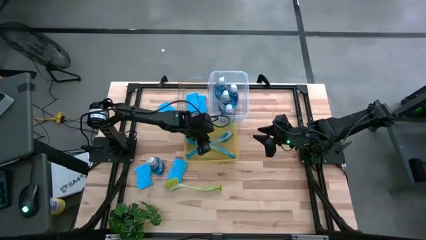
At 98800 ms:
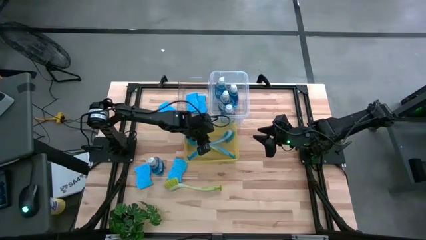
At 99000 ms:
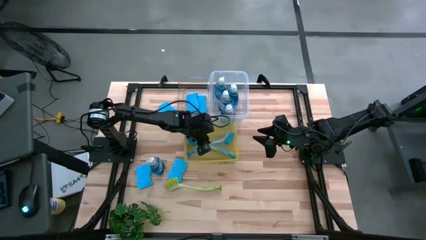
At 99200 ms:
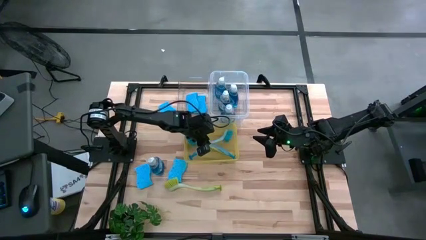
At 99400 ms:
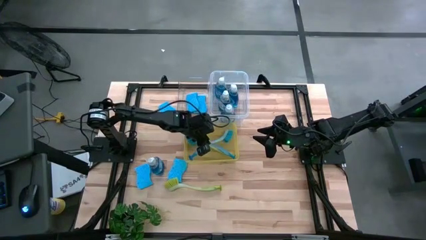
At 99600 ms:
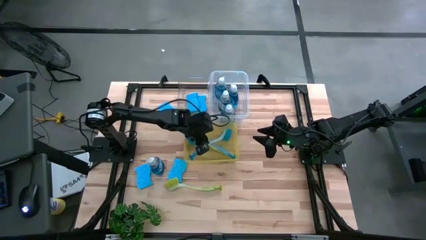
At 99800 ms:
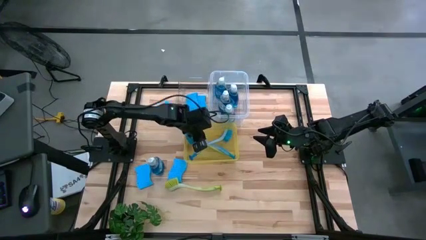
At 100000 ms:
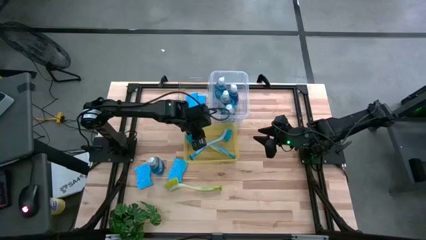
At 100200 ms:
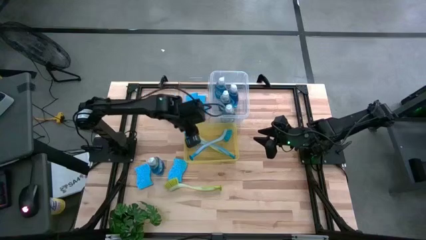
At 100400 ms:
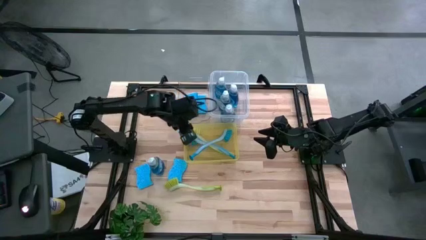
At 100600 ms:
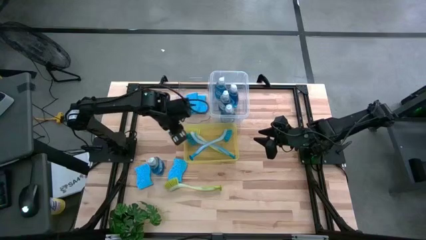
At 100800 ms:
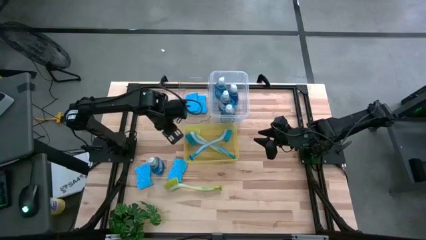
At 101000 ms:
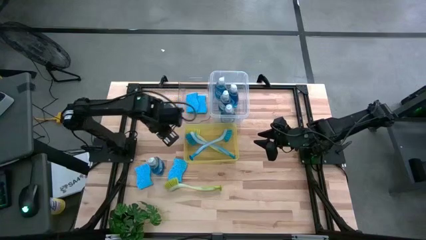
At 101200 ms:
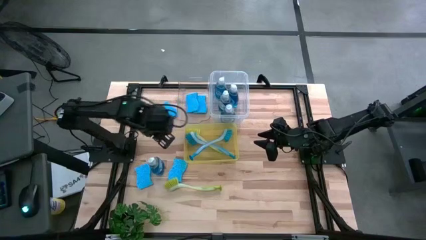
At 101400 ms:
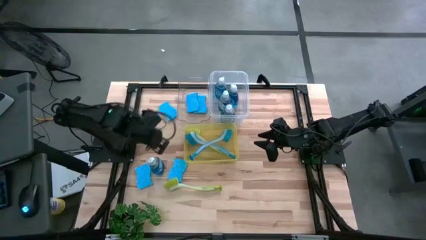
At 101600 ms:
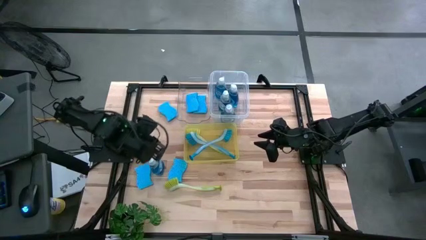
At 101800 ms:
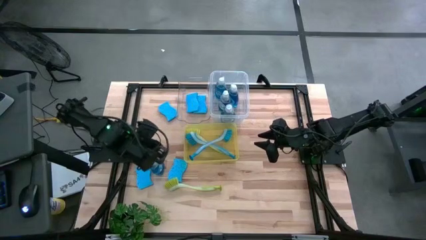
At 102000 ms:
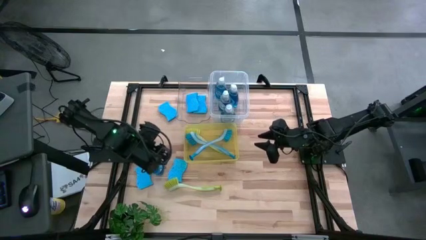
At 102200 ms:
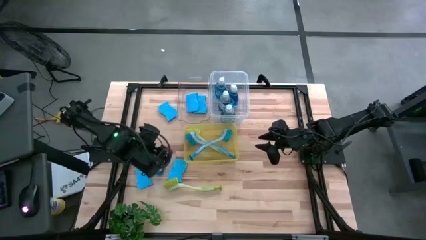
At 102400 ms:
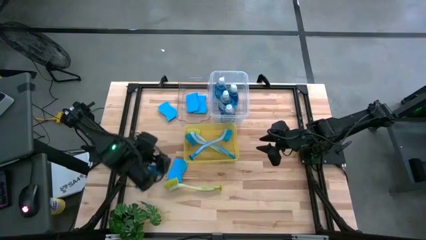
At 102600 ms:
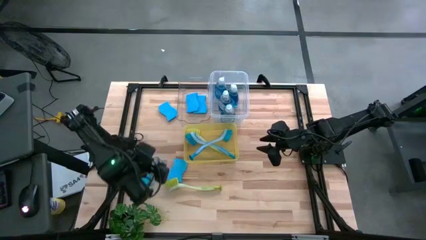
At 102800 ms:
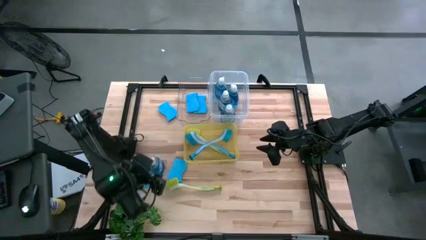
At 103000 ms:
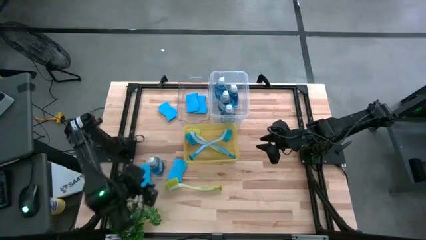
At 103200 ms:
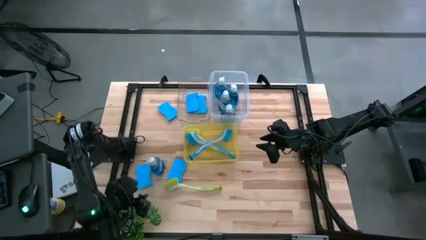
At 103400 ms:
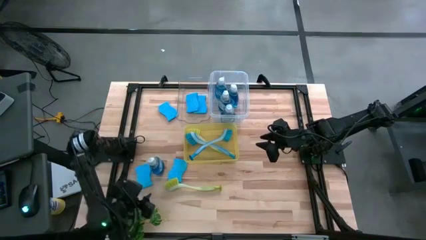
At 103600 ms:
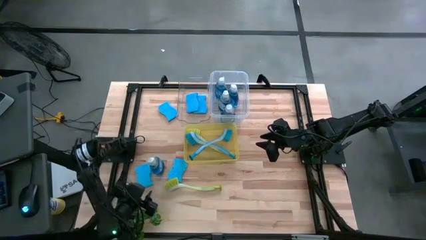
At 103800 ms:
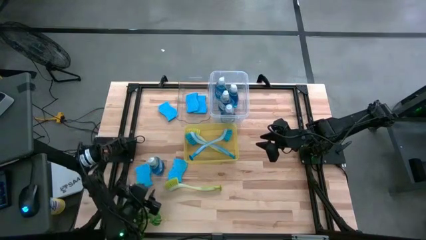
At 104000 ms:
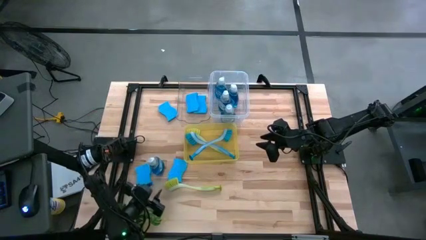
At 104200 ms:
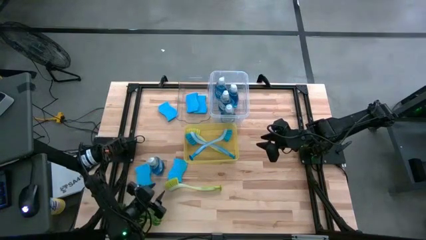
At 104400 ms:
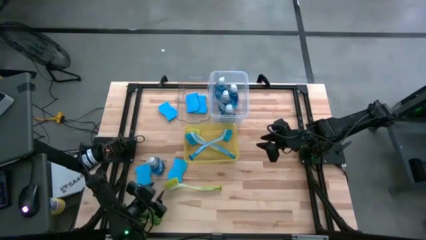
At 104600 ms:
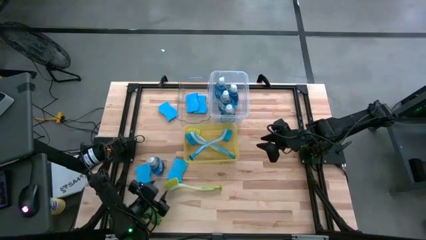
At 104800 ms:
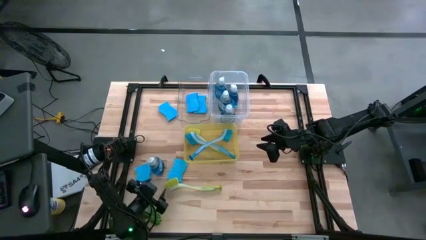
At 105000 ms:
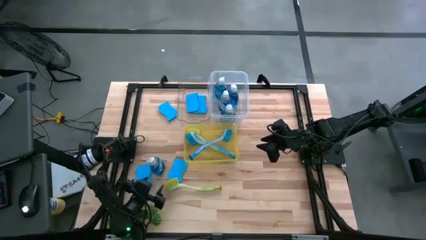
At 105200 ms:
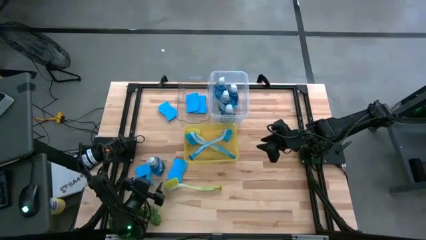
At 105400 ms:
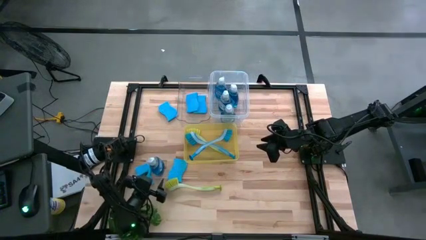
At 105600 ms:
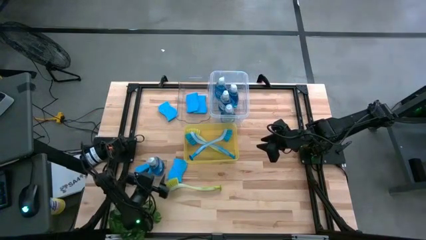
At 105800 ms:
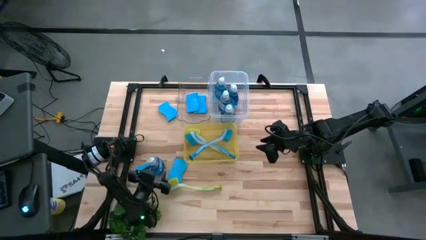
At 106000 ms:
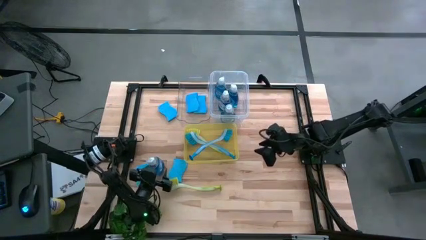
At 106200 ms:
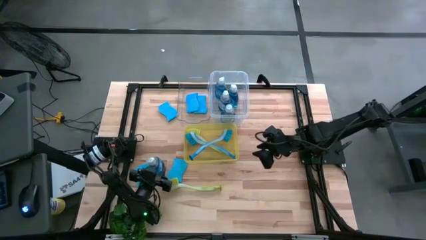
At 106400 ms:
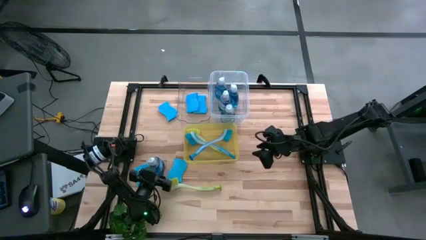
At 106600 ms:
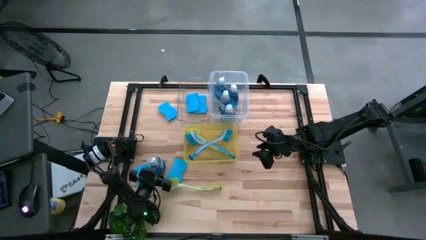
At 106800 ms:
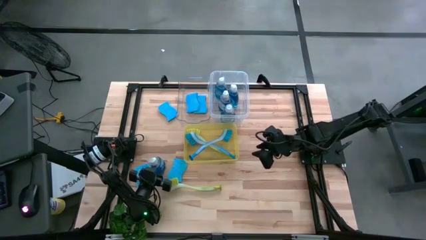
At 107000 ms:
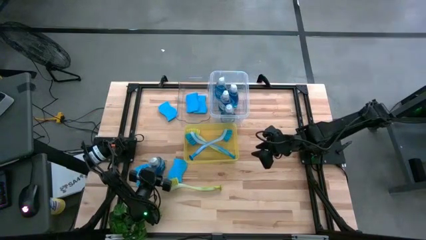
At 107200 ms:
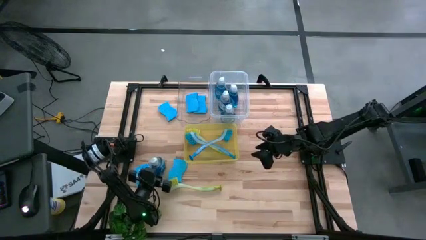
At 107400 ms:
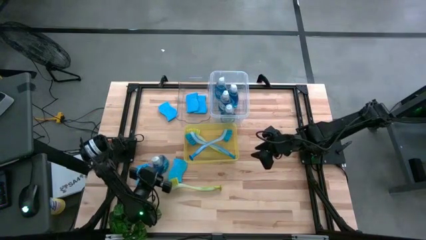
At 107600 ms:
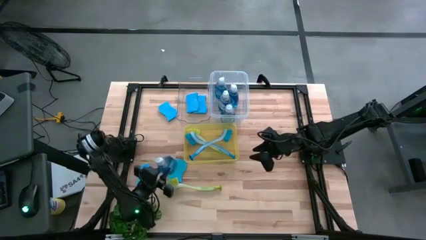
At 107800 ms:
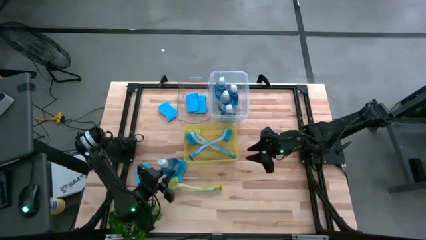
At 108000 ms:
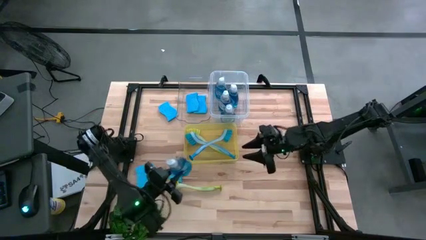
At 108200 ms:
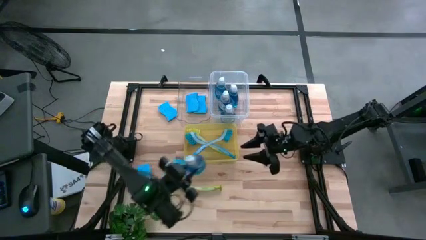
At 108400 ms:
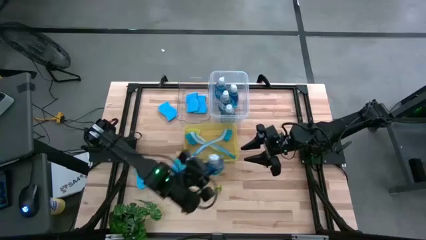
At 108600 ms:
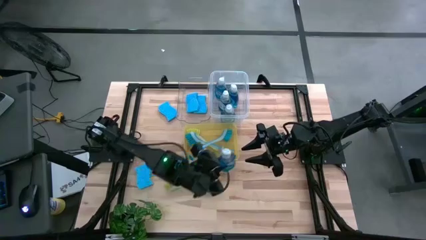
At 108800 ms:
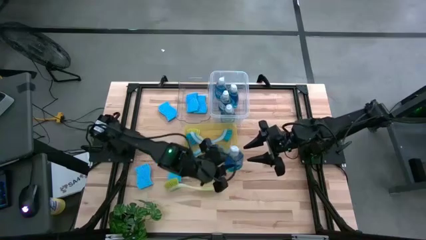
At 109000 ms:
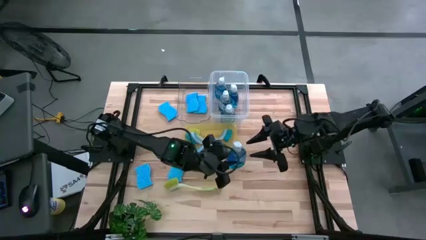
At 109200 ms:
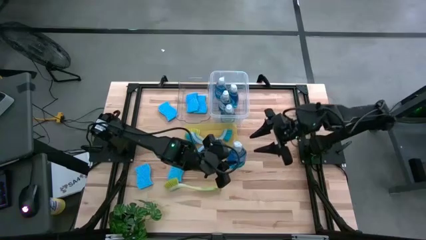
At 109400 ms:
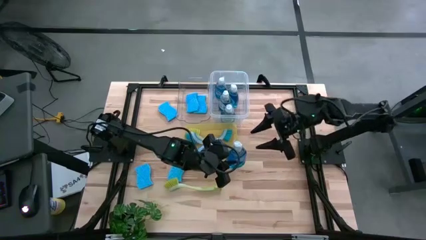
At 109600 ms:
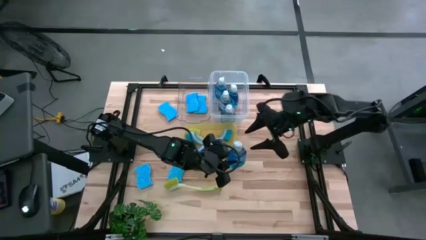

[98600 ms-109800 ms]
Task: Pick & Place Kitchen Sink Supplies
Put the blue dishwasher liquid into the white bin
